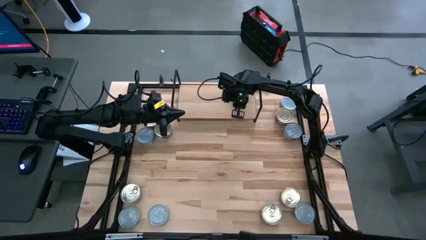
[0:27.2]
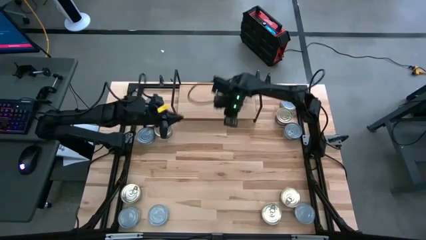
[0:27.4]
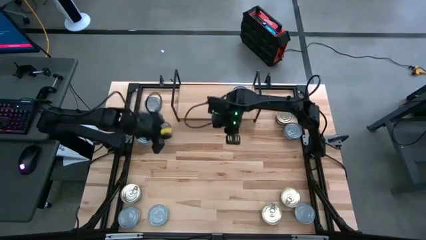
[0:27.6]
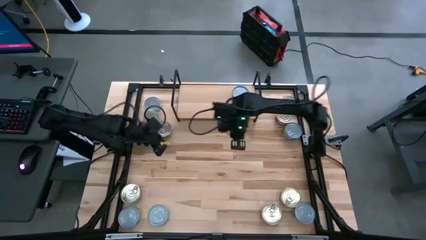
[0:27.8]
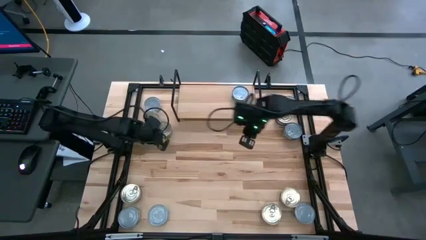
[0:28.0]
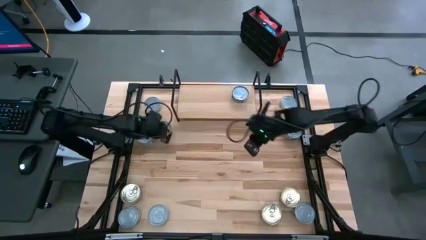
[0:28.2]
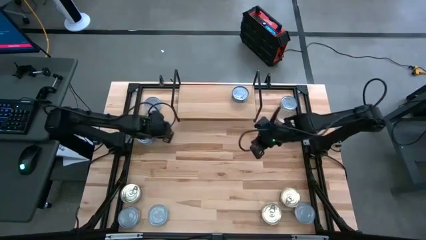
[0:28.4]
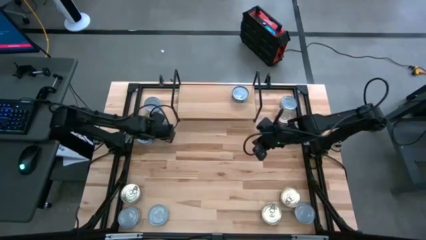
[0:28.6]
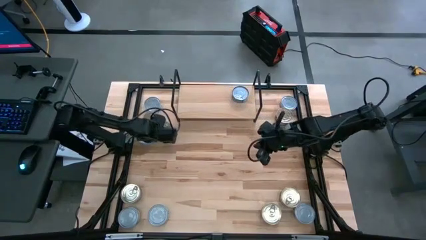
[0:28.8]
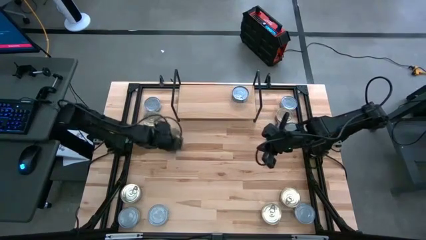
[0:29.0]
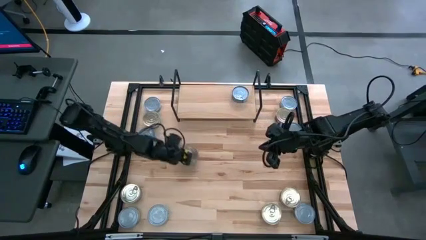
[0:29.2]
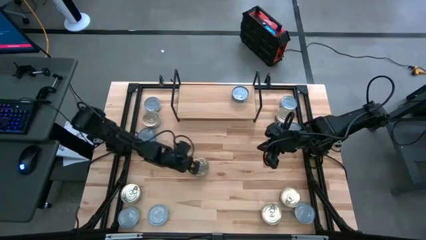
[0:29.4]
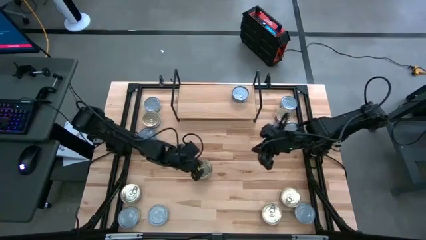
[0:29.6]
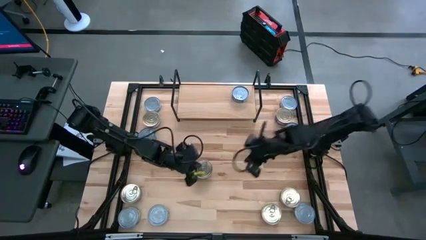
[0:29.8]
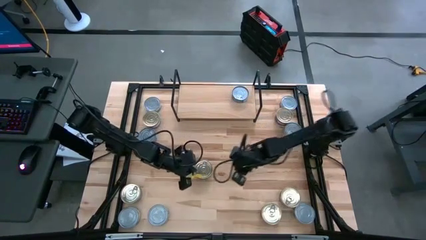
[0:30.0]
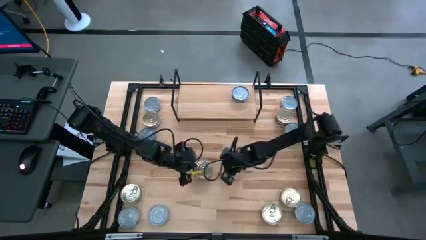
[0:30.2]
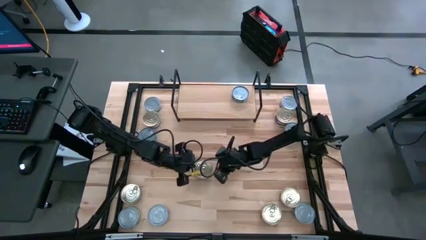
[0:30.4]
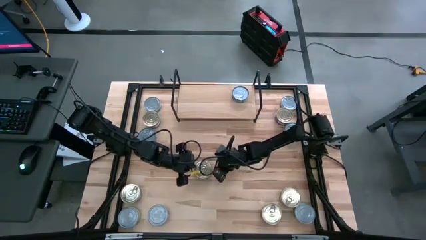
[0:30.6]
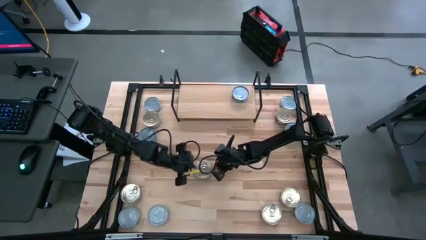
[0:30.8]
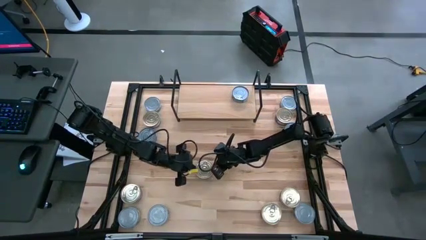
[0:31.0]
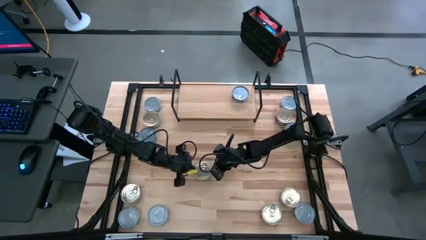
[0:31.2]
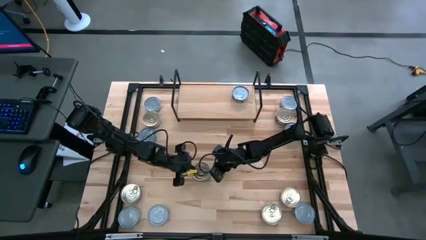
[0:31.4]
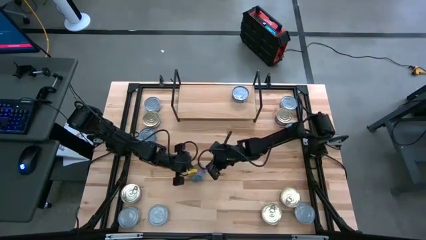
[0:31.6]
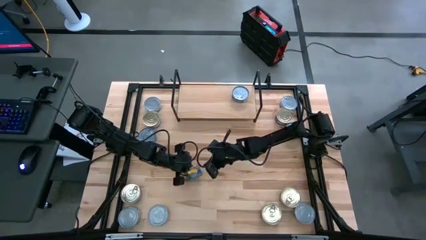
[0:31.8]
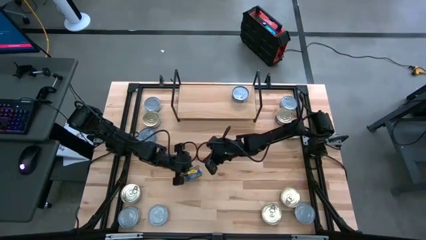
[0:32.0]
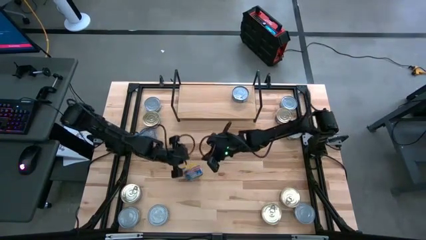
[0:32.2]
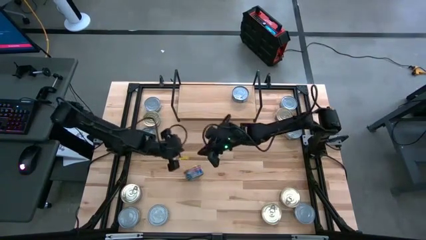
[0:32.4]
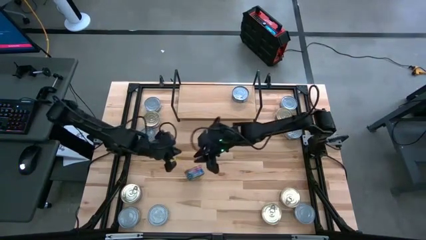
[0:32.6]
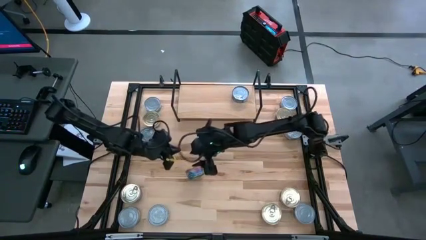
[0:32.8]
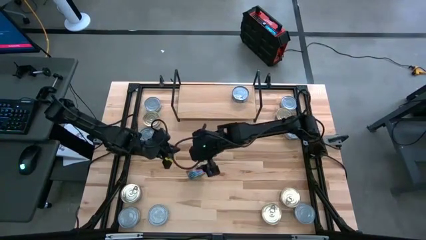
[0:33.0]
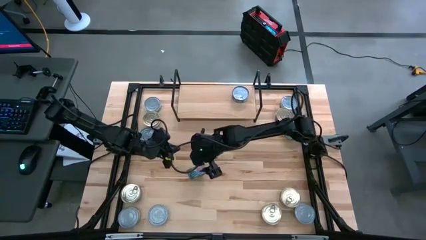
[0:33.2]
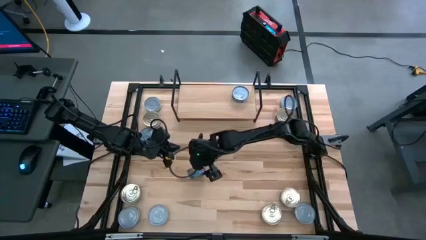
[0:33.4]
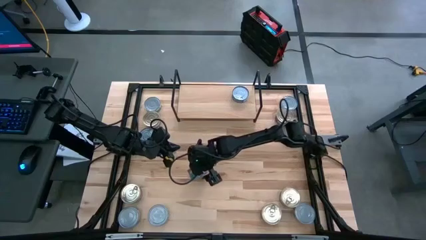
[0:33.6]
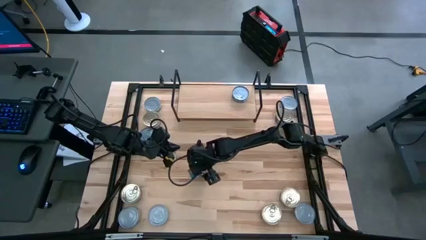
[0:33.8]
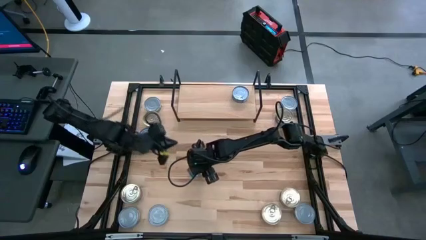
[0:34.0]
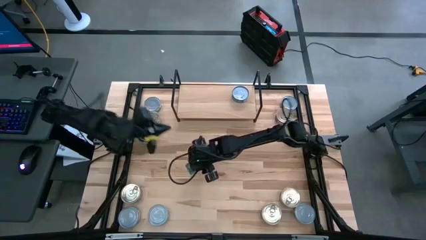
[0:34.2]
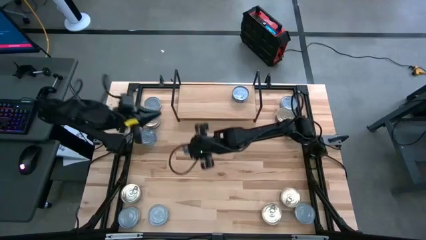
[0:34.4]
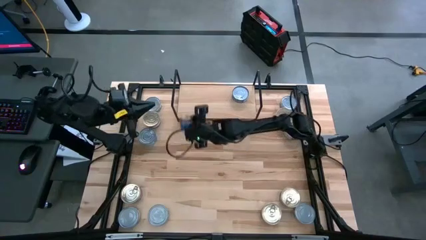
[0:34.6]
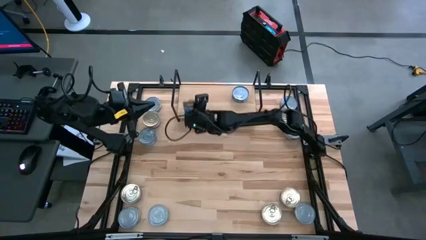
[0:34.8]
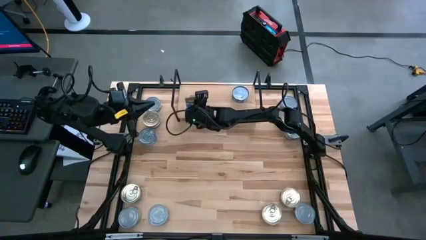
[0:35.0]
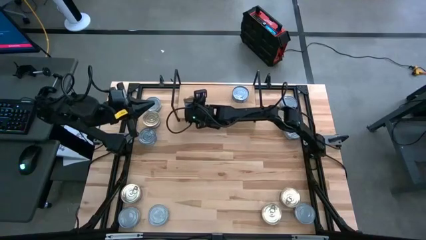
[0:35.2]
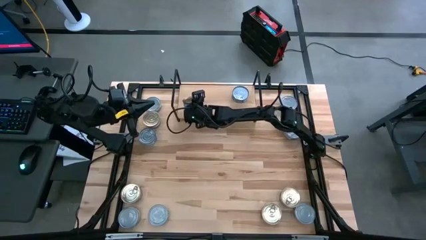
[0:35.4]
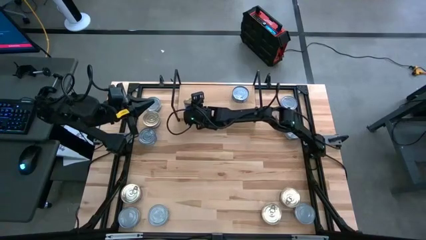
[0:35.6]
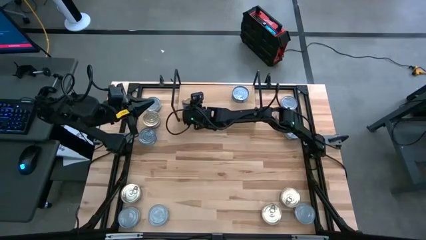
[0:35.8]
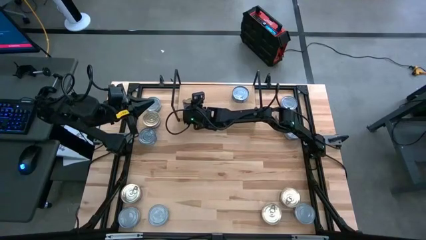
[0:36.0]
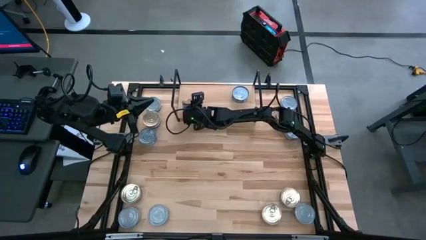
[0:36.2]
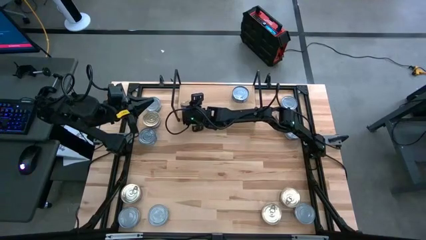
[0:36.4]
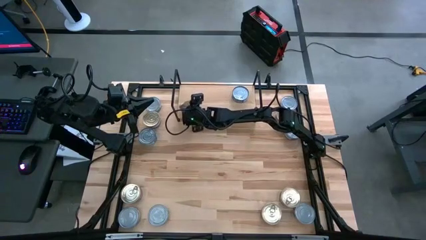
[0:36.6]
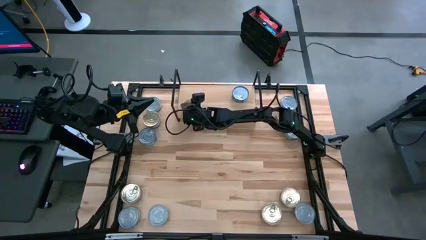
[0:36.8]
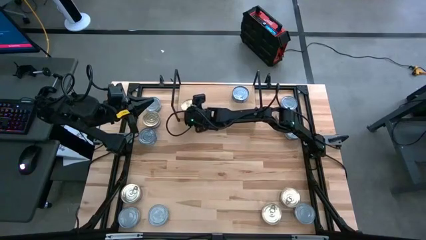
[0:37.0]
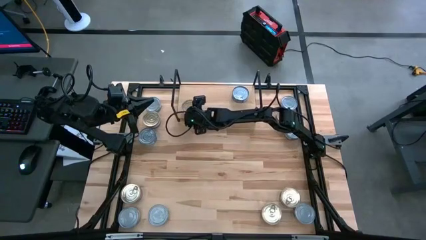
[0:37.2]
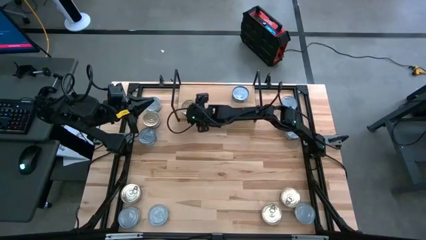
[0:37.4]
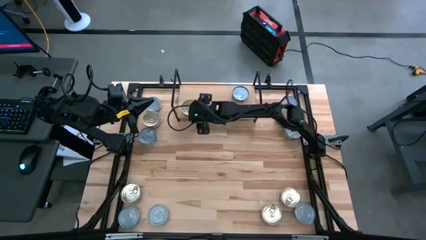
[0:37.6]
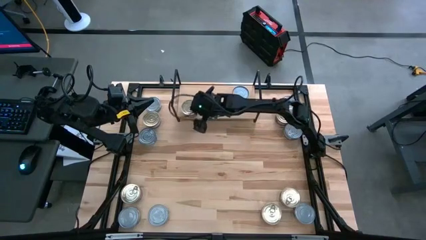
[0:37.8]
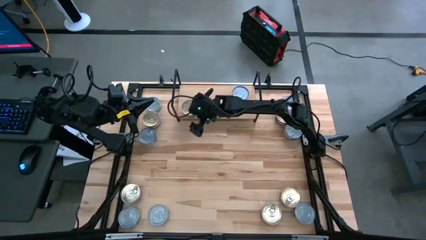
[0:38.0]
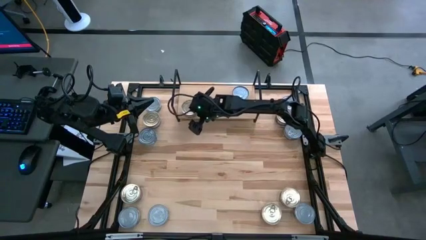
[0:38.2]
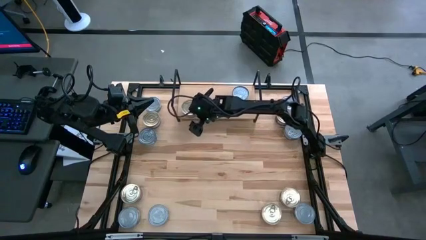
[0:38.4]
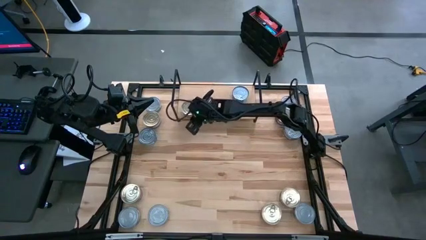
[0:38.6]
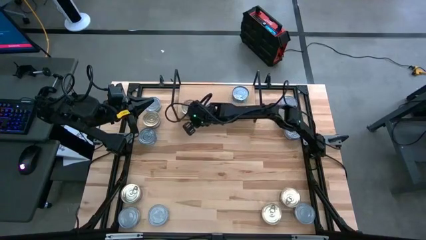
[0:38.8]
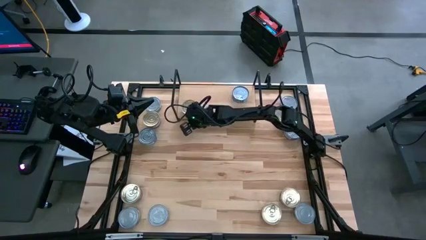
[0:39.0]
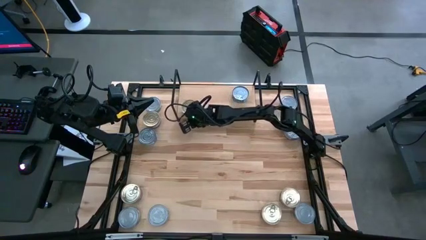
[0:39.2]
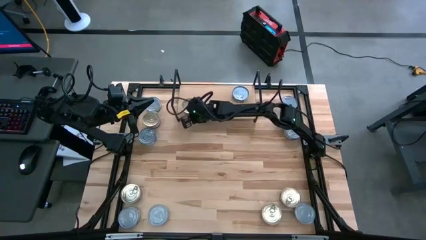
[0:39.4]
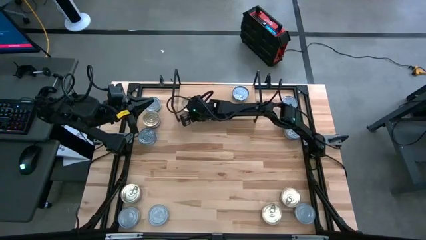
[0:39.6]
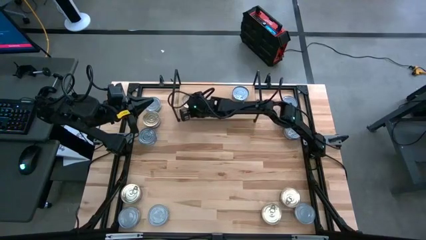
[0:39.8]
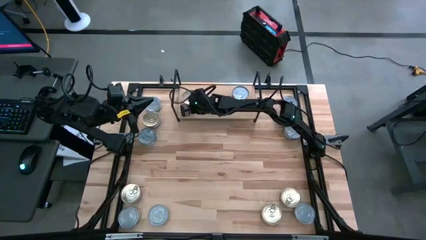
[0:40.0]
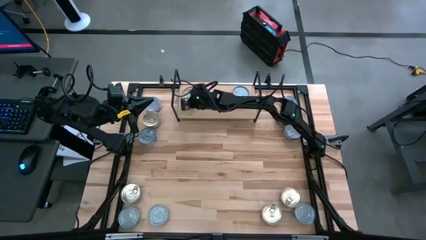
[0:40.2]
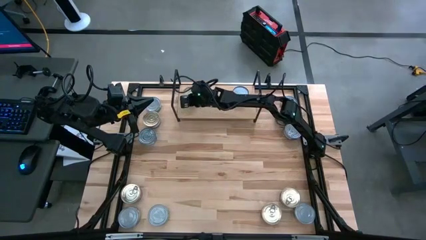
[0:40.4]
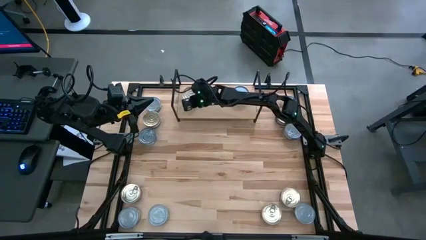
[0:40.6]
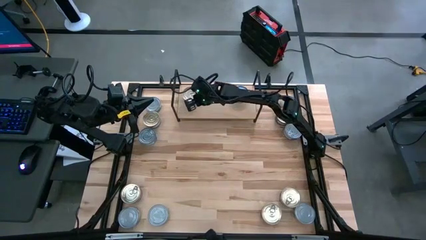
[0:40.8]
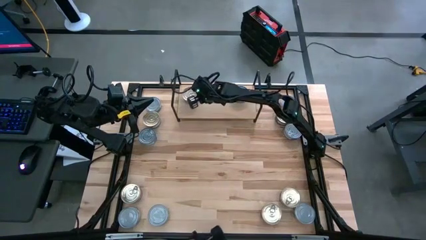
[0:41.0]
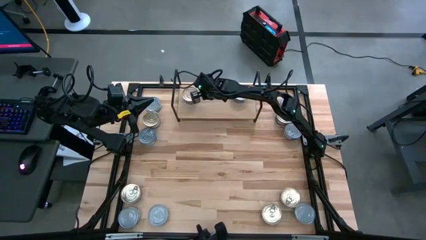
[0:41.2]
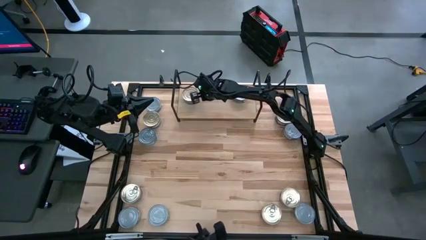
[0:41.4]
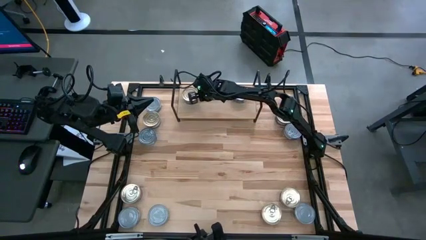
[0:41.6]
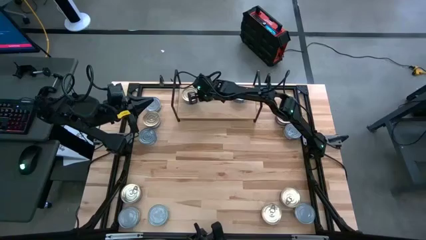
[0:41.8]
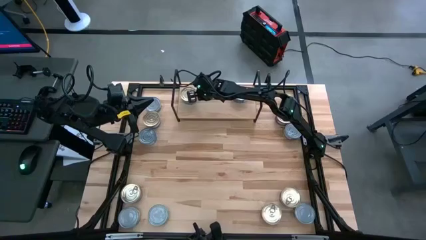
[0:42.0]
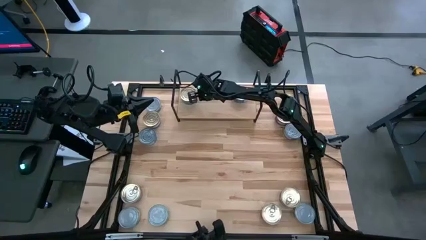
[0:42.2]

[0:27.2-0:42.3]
Task: Stack canned seafood by type on shelf
Put the blue pink tuna can on the shelf
